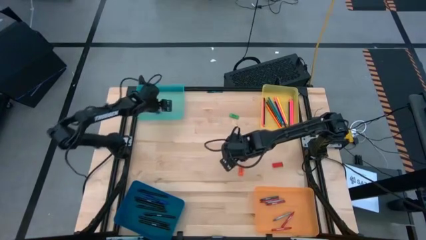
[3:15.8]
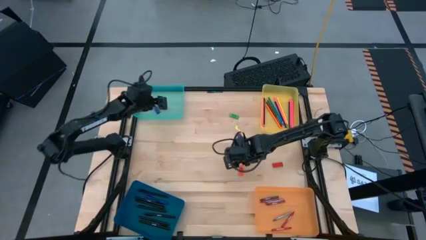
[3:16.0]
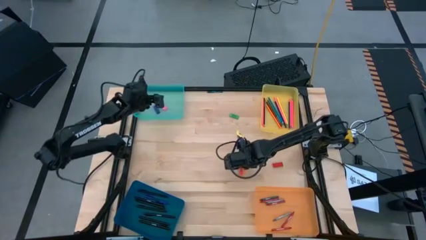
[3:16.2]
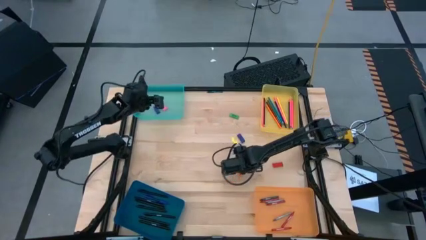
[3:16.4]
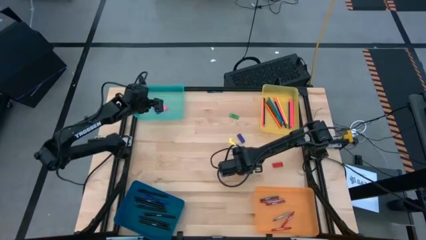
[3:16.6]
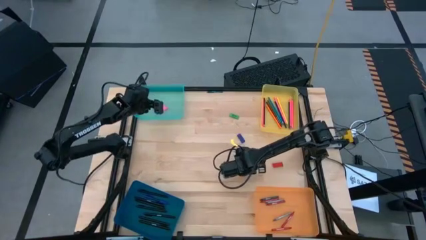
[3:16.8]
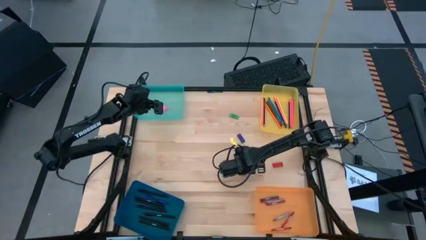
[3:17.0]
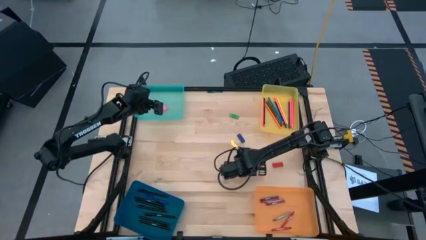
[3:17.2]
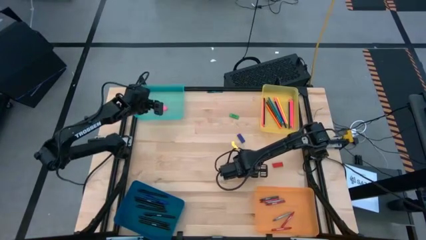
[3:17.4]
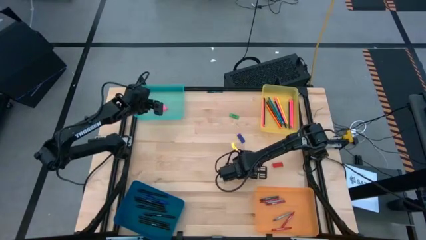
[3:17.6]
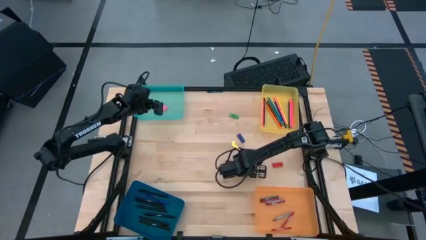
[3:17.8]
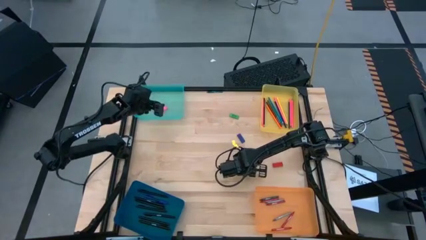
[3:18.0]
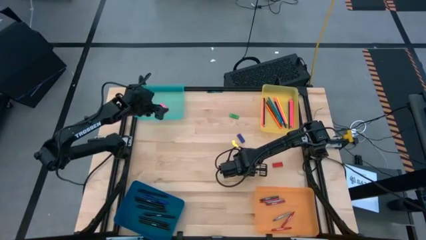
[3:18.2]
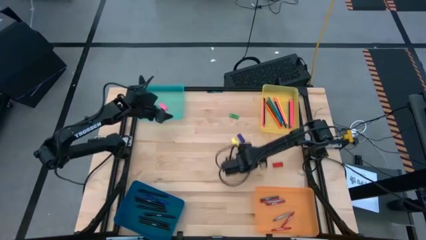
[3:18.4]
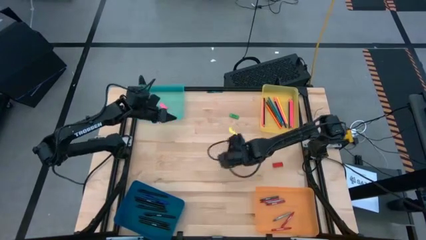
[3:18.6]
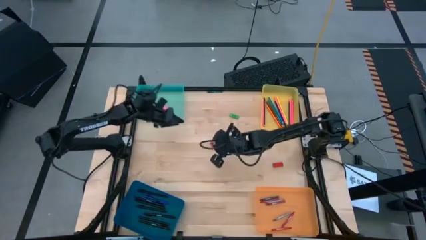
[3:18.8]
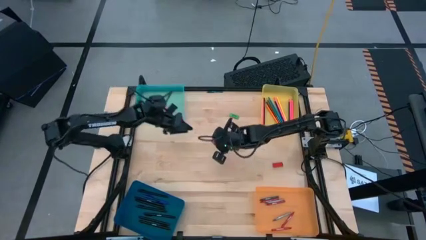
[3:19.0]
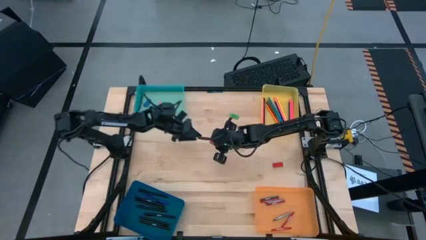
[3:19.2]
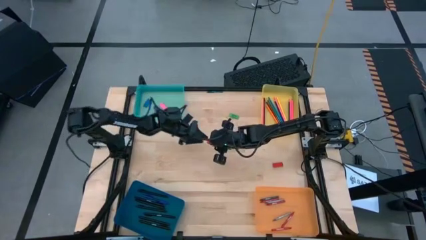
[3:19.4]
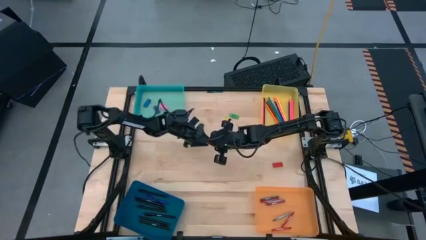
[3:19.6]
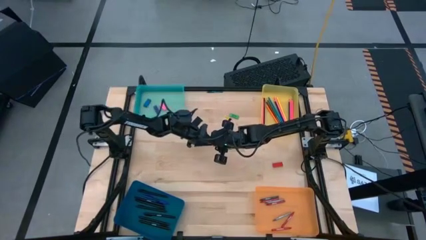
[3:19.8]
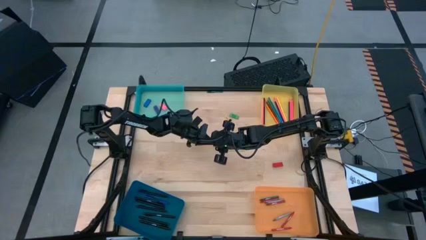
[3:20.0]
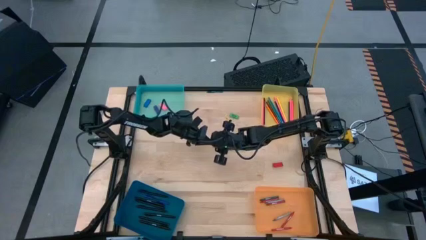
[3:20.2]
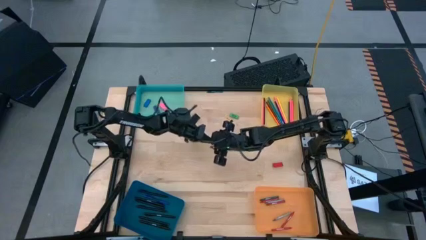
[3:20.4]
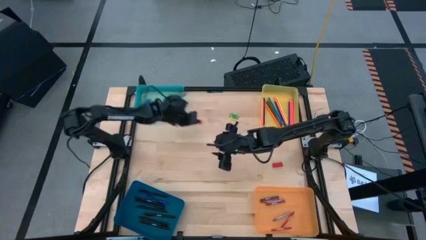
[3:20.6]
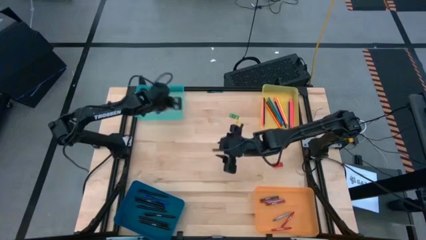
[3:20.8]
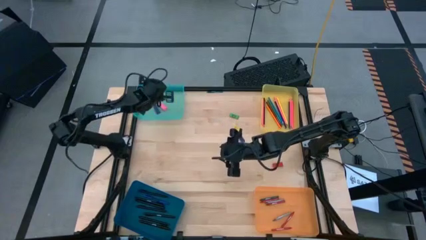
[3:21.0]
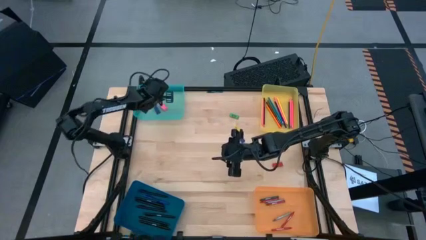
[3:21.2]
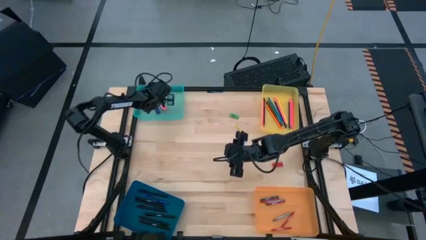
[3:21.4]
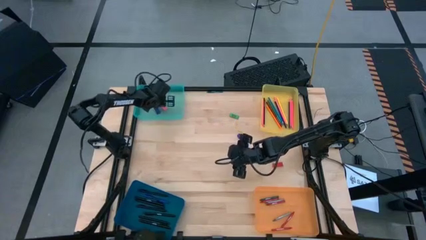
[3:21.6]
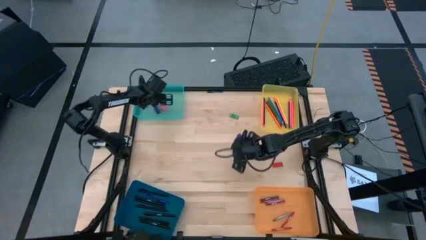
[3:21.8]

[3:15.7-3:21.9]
Task: Sort crayons/erasers/pens/pencils in bins
Put the orange eraser into the light blue bin

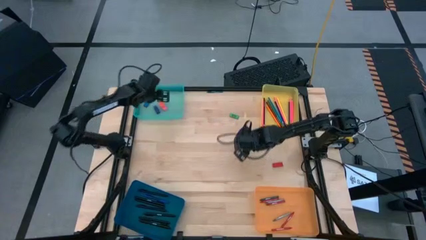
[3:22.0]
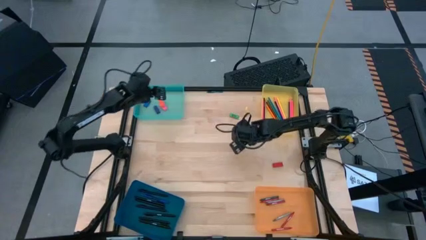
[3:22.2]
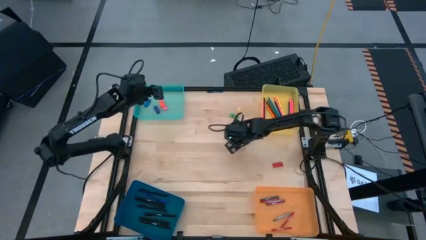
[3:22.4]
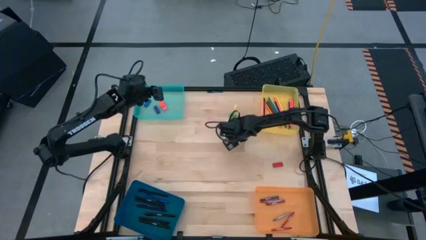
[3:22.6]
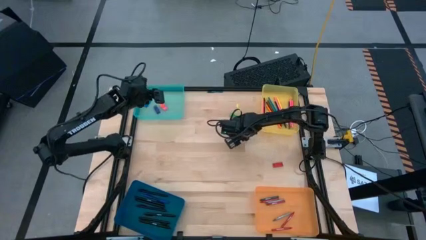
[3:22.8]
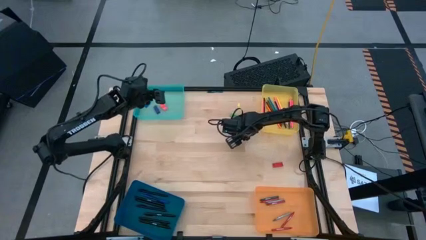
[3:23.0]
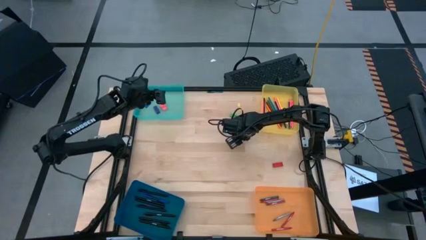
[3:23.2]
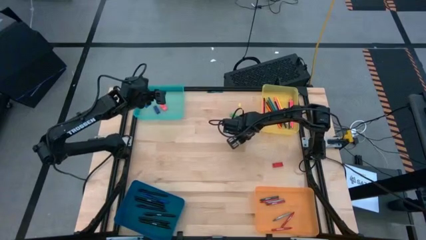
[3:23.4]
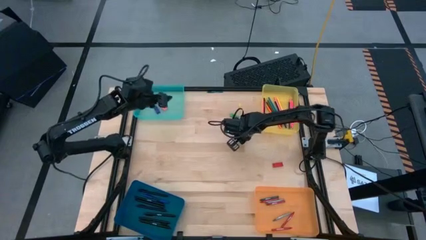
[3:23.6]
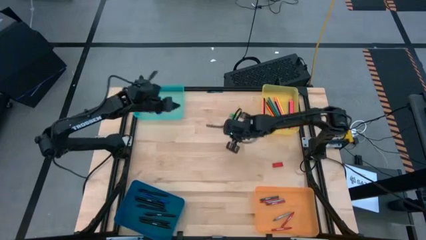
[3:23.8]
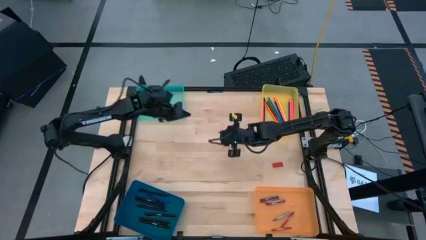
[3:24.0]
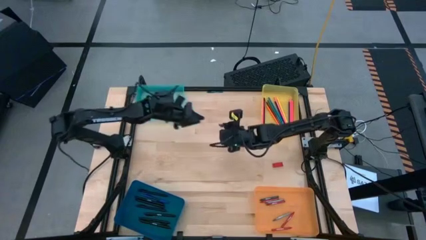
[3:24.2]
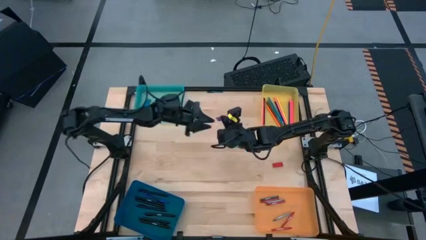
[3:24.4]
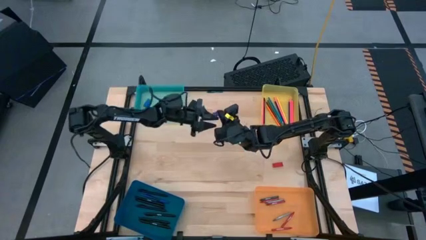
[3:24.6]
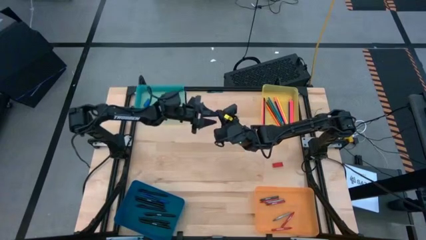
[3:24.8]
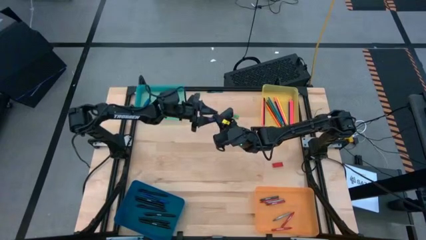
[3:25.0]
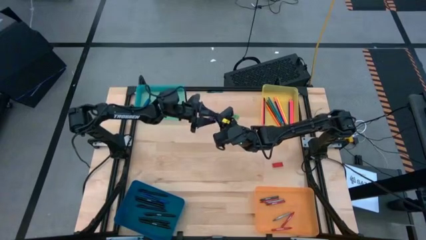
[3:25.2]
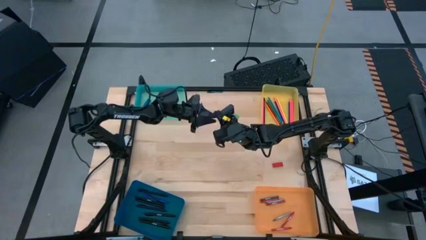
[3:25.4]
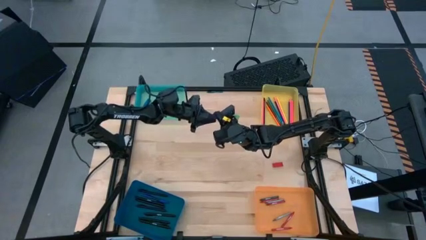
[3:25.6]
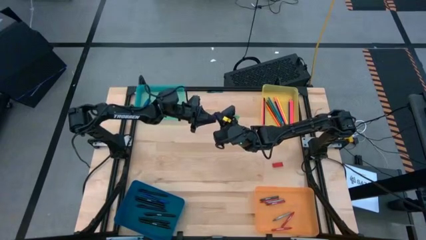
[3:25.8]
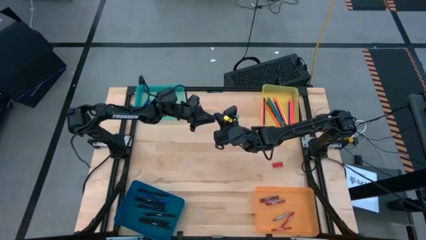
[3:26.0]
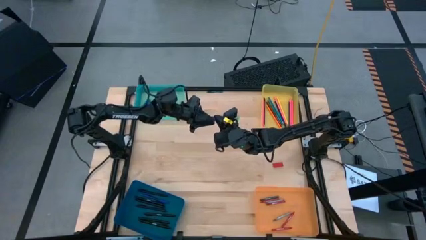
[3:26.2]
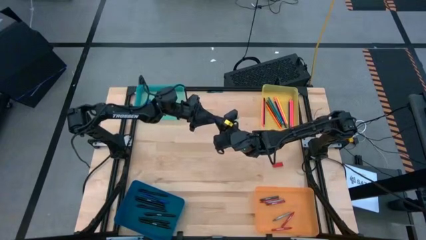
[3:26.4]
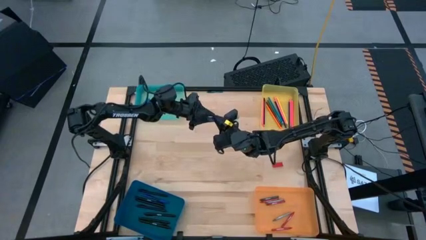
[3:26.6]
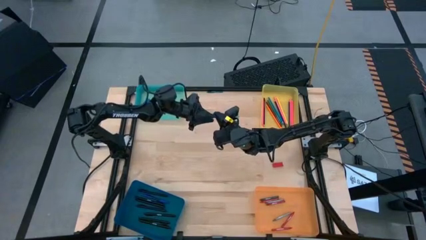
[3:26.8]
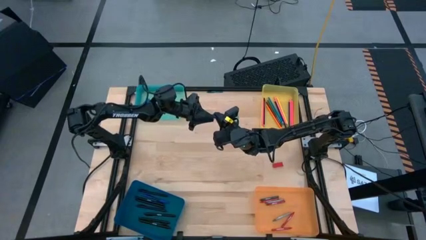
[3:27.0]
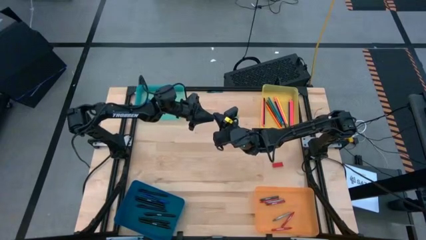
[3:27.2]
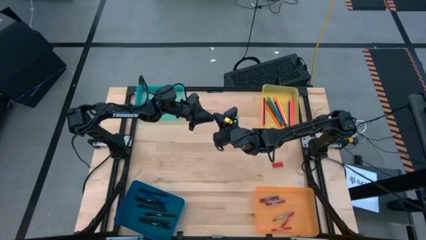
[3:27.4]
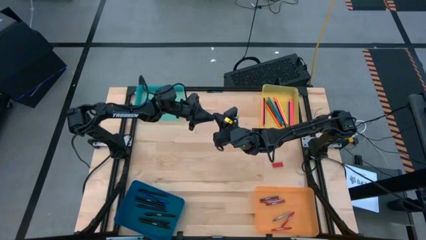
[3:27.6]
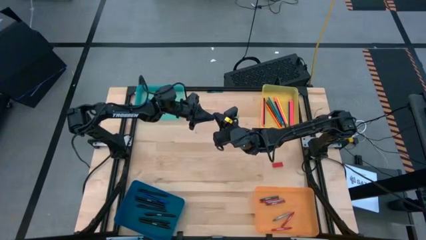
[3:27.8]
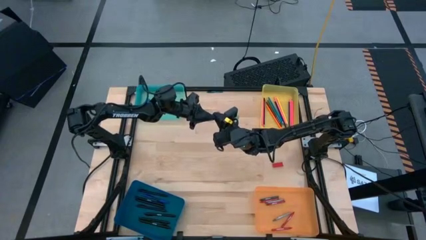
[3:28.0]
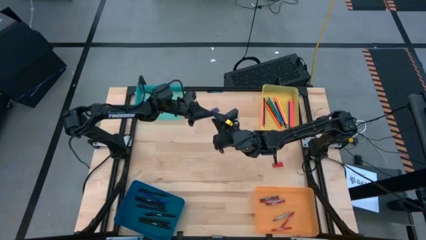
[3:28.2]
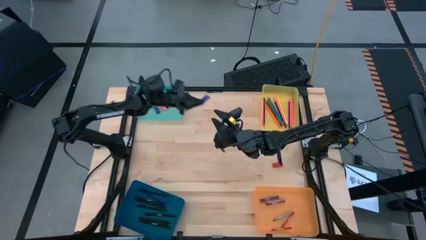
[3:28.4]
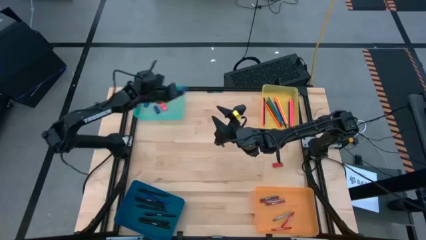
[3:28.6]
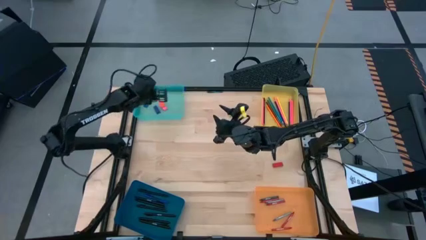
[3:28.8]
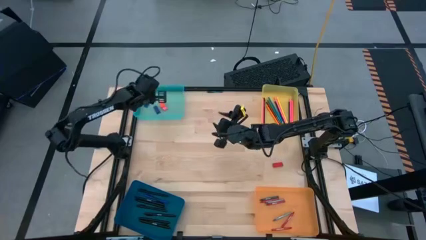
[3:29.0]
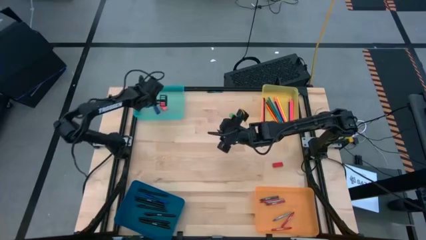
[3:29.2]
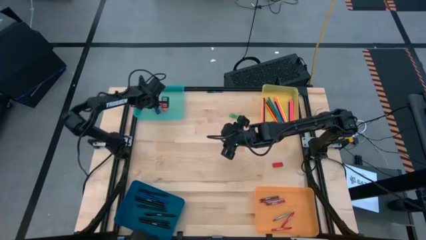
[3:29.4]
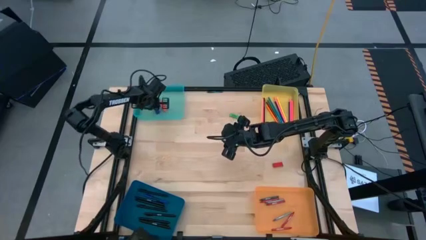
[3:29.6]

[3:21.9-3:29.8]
Put the violet eraser into the light blue bin

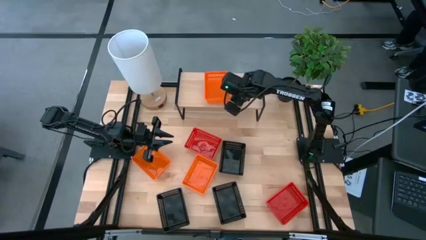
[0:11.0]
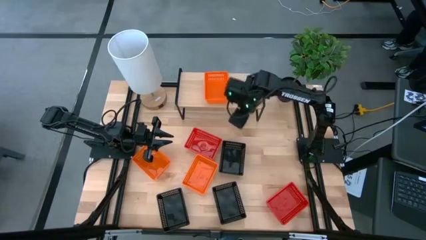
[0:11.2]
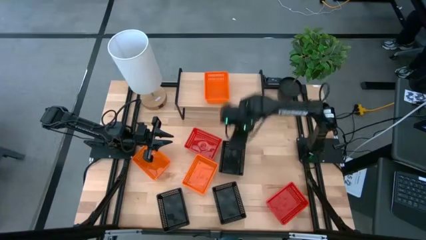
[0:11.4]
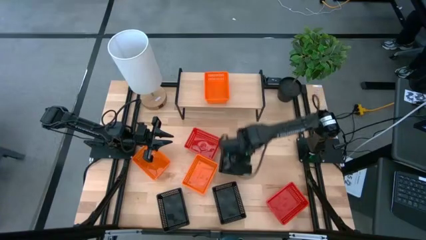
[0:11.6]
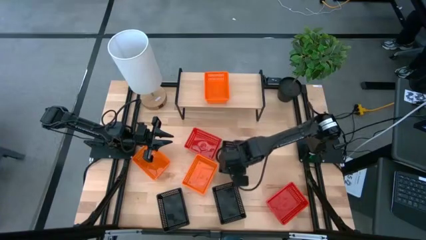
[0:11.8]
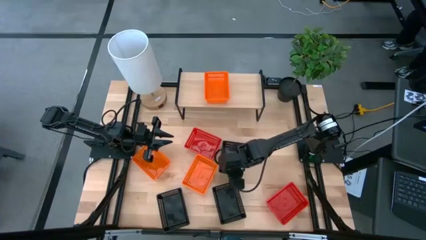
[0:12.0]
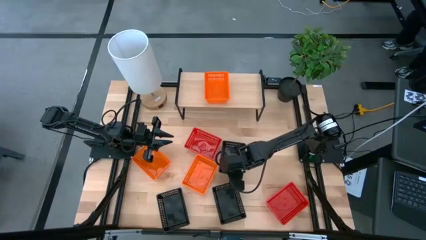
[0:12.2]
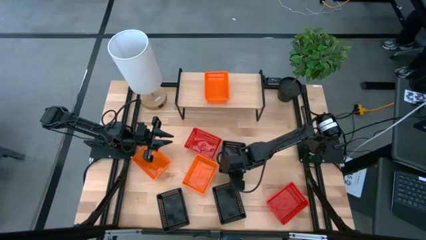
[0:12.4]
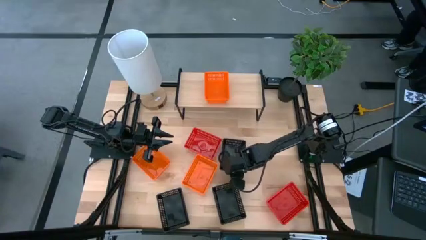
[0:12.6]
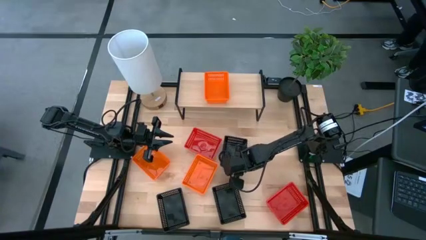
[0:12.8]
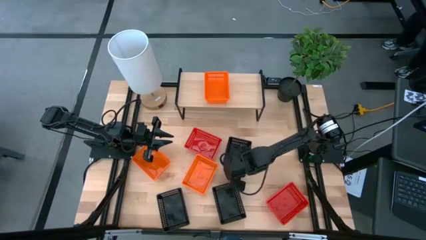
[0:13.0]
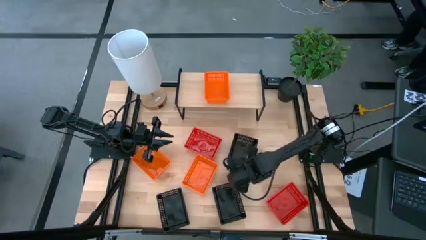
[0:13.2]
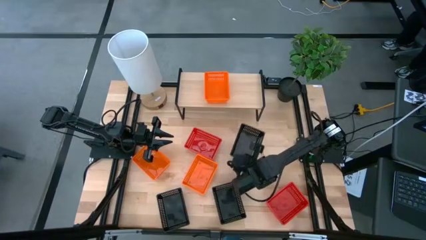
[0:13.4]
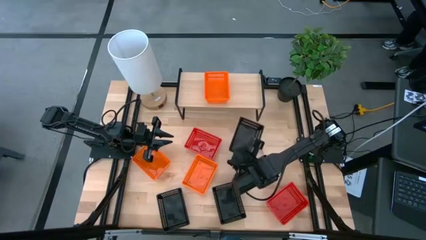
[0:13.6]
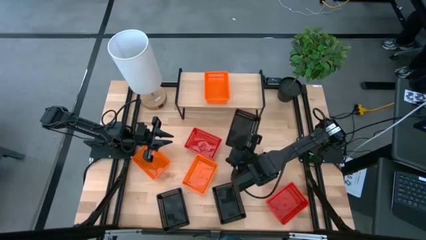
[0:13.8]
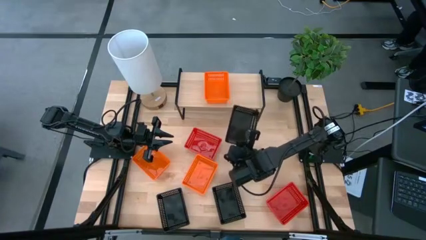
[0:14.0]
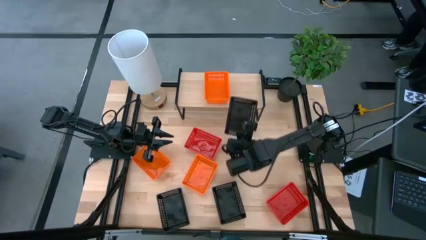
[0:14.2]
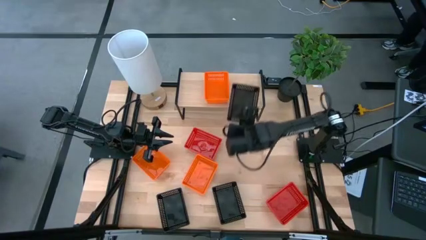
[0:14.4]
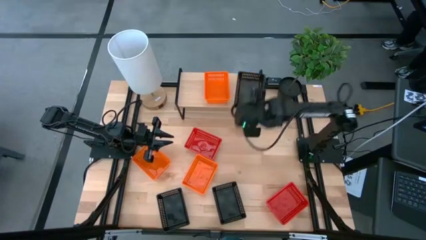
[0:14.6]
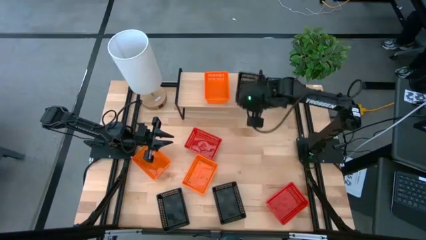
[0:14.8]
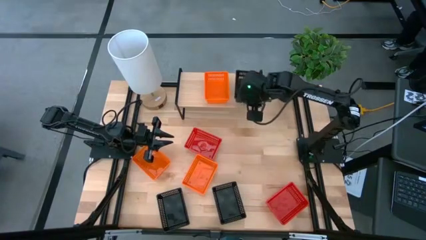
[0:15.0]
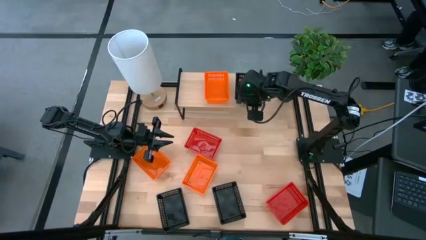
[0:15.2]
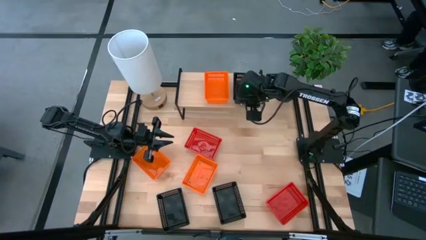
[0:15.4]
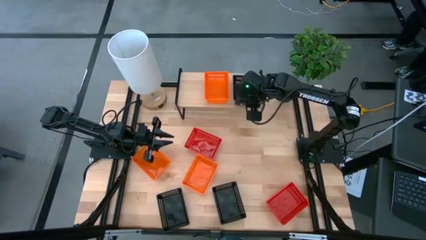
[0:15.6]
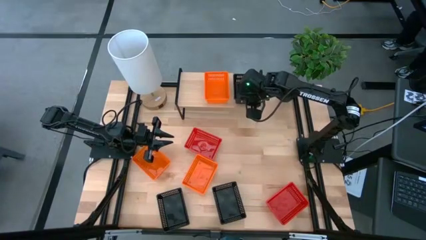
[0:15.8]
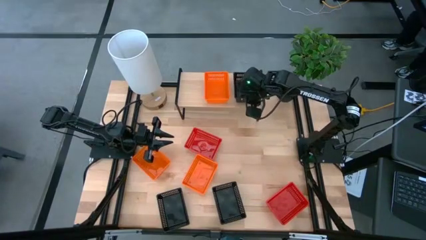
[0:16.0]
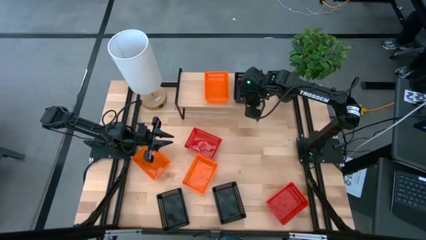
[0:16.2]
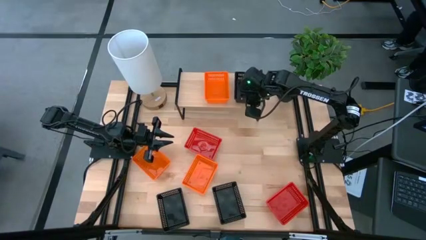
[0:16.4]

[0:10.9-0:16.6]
Task: Stack baskets on shelf by color
Put the top black basket on the shelf
